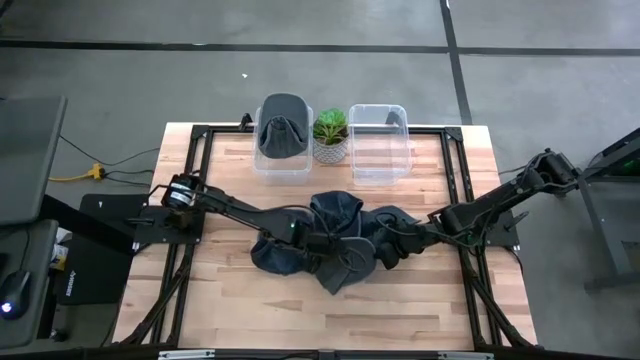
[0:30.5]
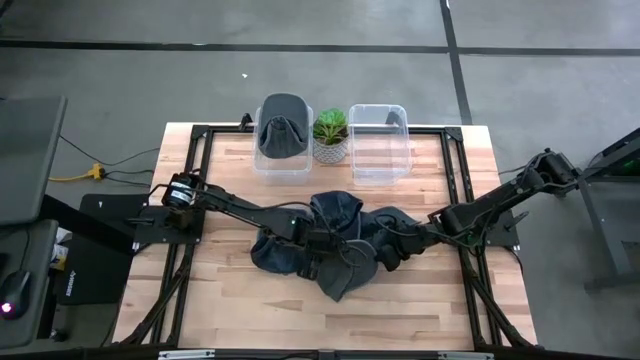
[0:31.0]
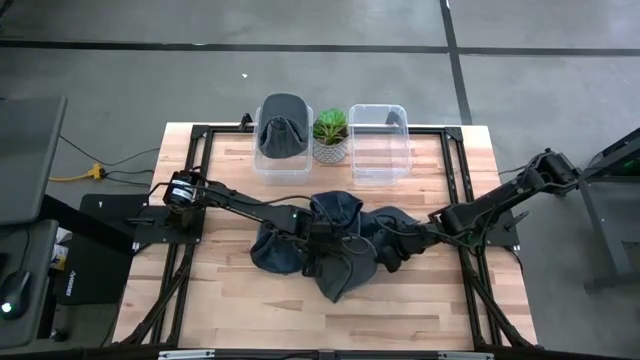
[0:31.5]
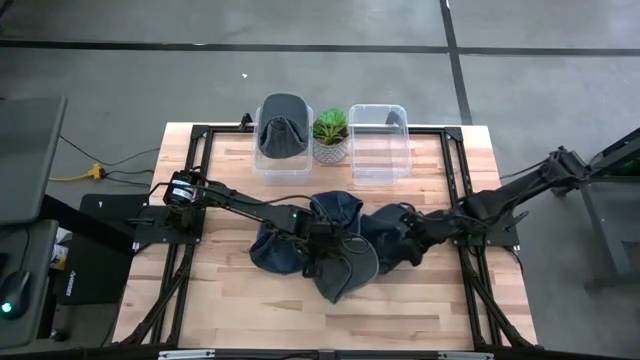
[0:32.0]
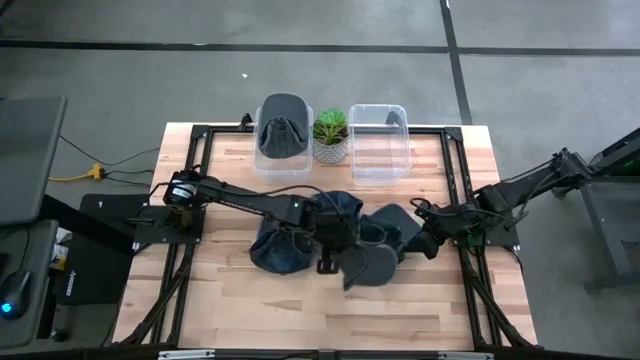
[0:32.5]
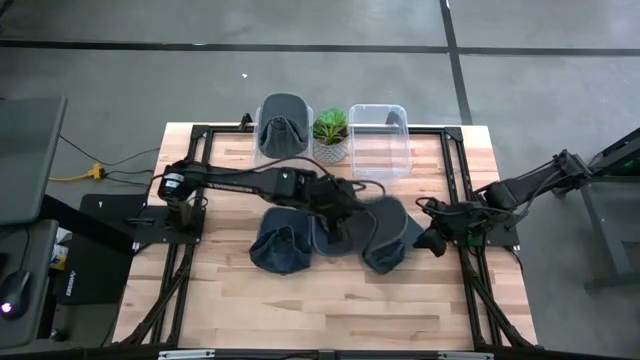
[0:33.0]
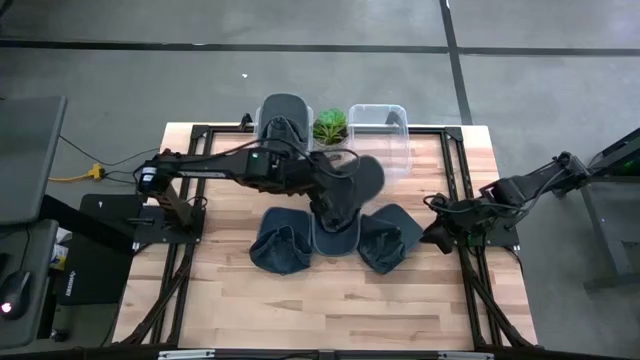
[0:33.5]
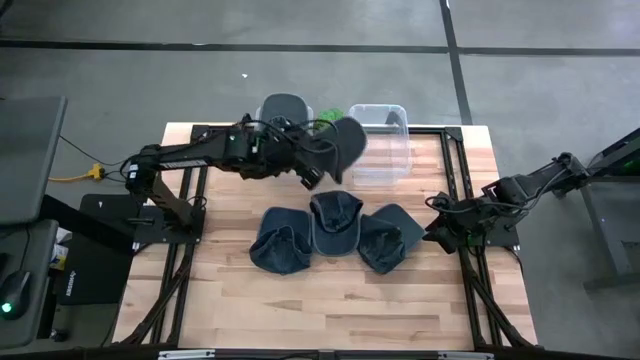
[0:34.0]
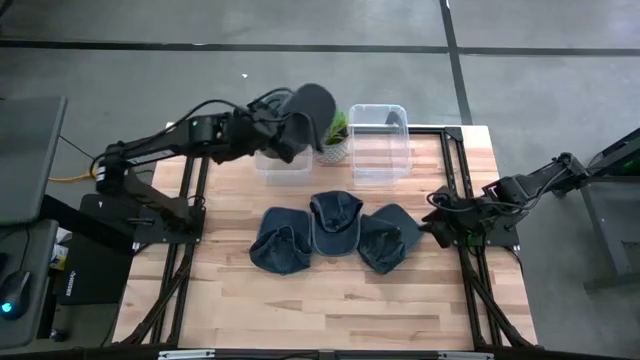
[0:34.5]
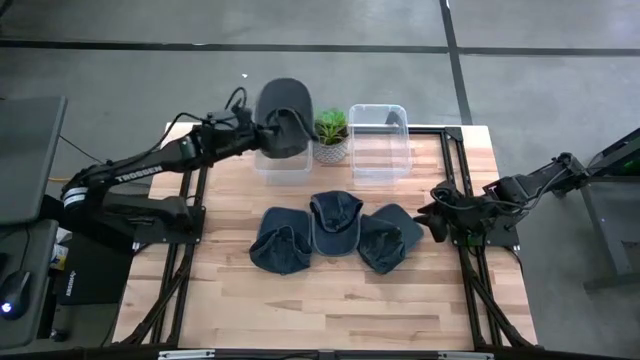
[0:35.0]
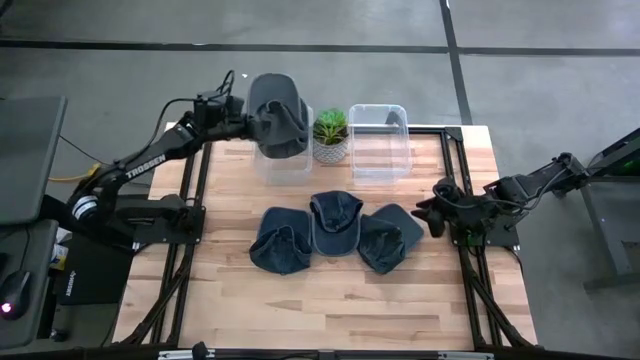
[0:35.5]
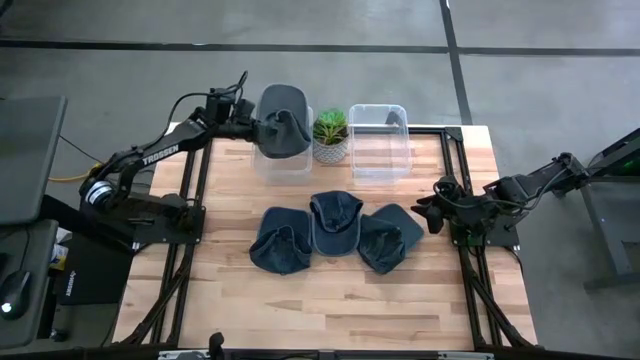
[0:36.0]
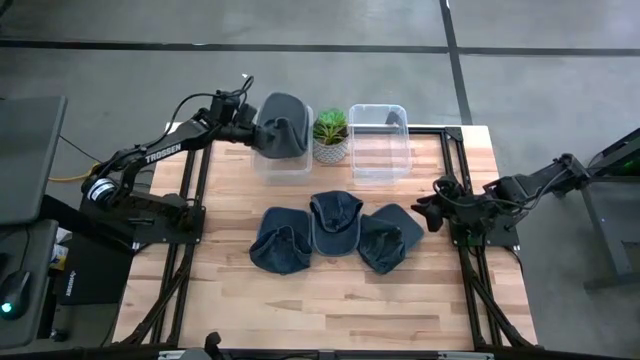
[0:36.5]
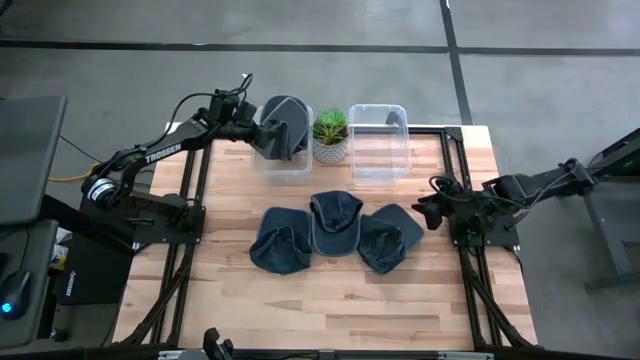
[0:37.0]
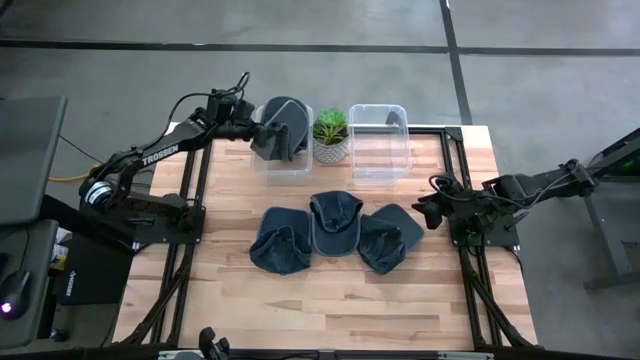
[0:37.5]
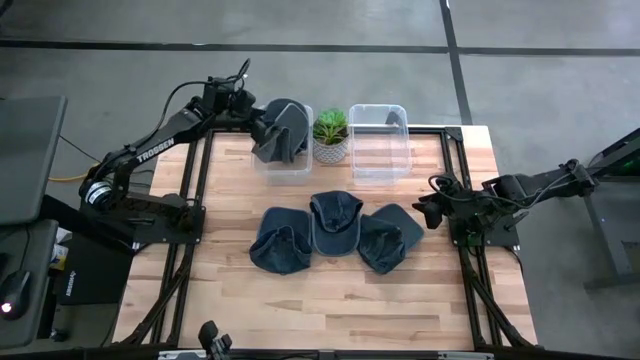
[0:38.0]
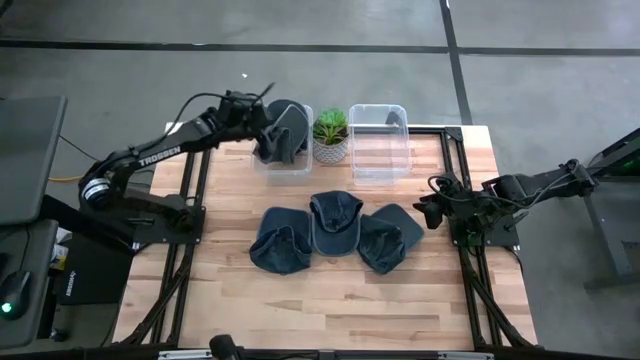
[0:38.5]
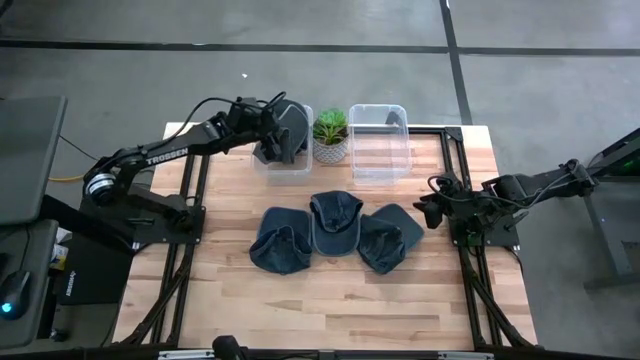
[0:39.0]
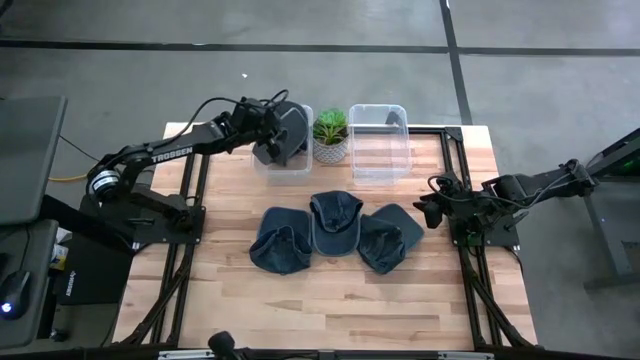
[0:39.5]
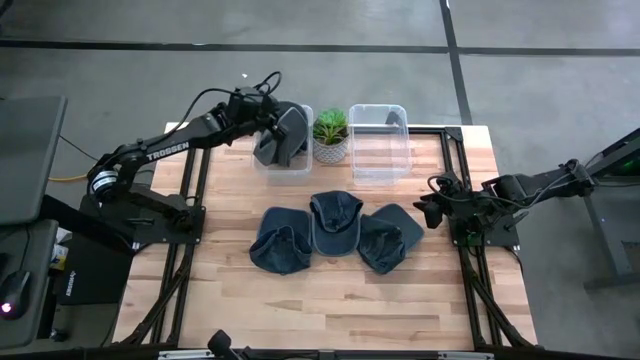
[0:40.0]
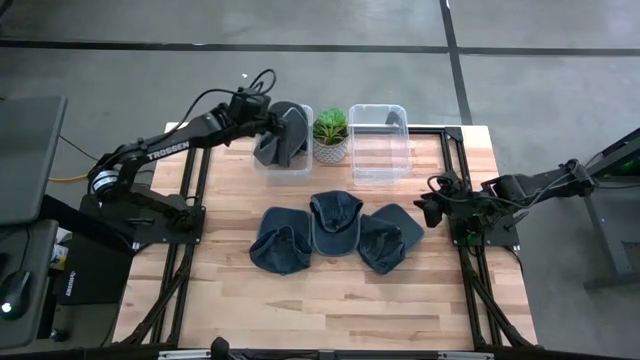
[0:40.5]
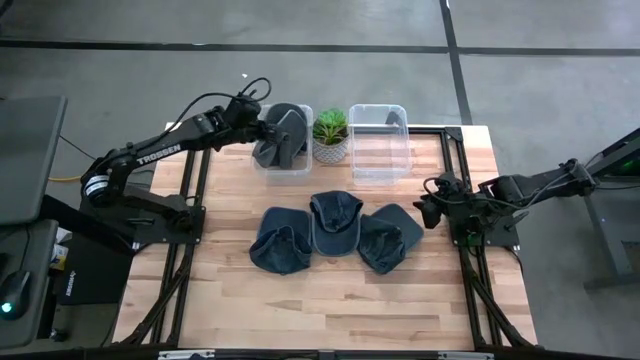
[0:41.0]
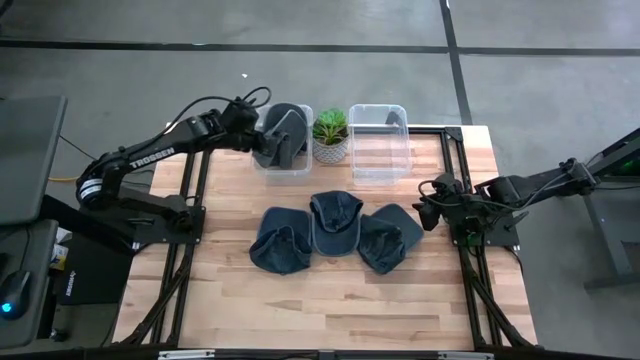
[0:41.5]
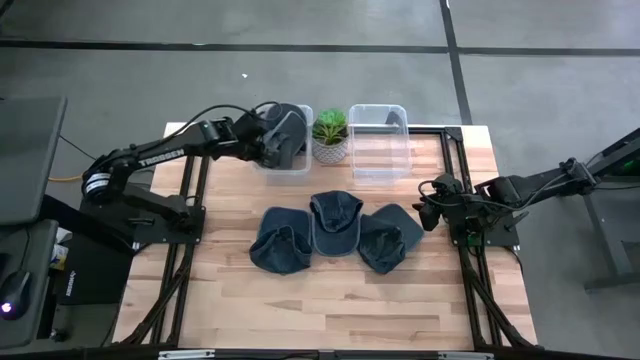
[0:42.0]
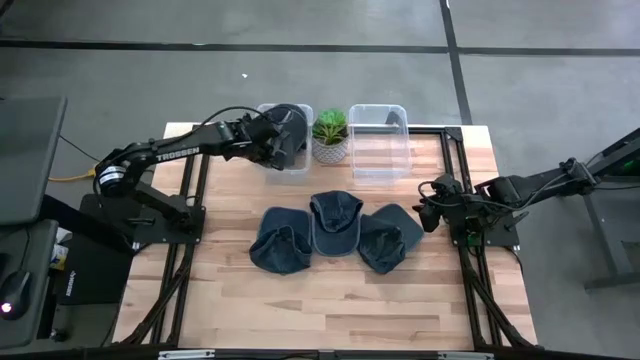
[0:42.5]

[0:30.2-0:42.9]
Task: Pick & Place hat
Put the gray cap into the left transparent bin

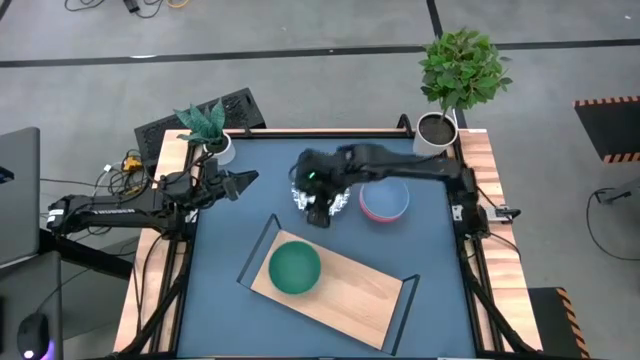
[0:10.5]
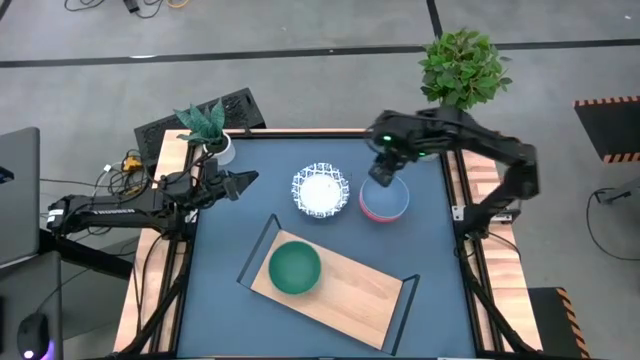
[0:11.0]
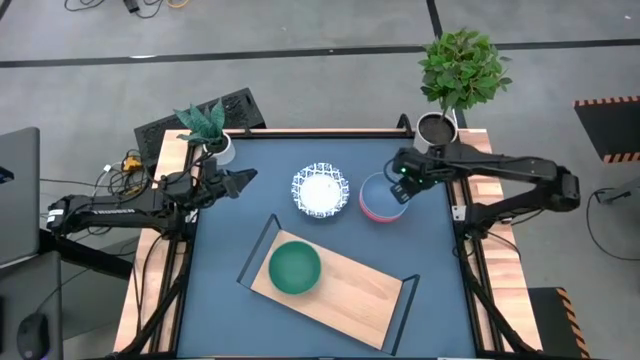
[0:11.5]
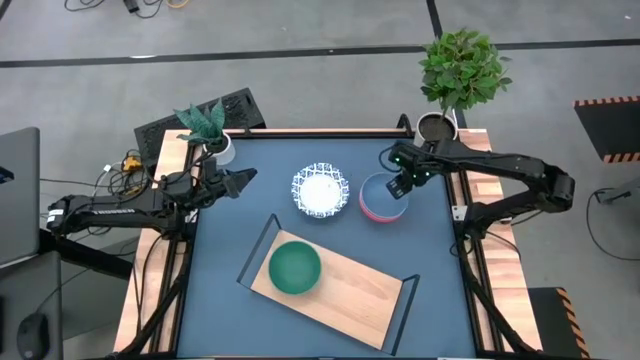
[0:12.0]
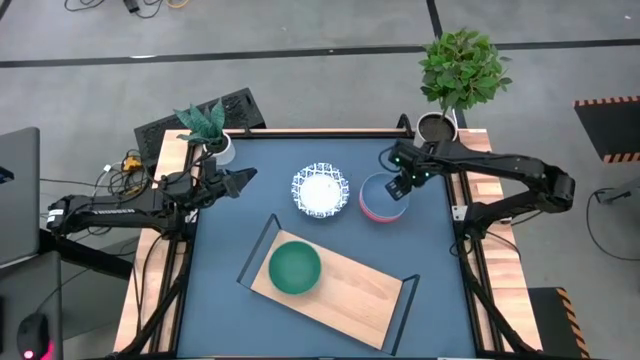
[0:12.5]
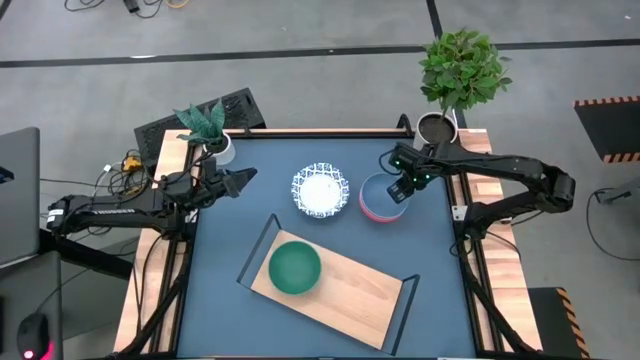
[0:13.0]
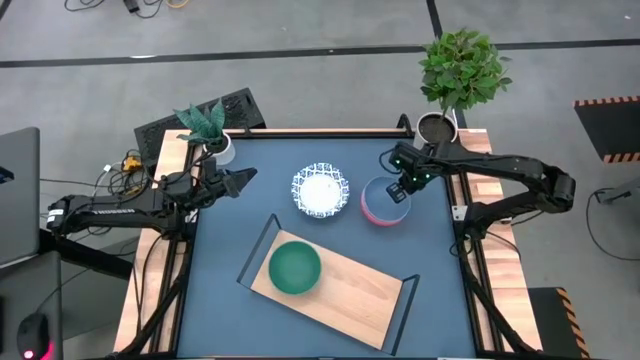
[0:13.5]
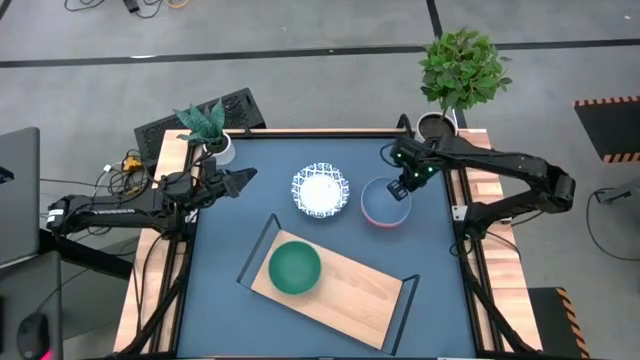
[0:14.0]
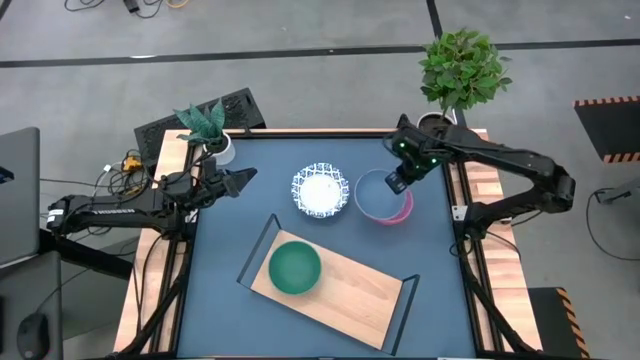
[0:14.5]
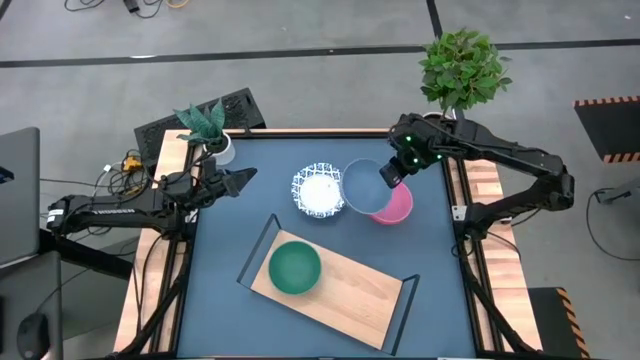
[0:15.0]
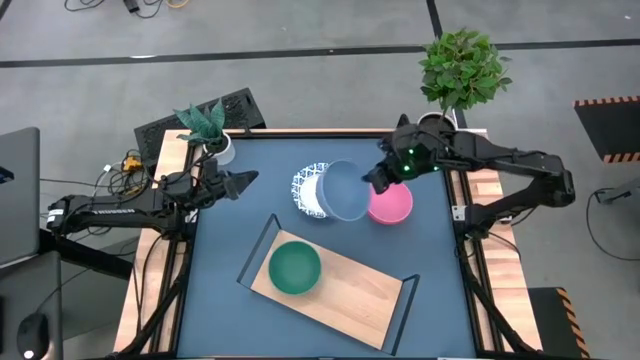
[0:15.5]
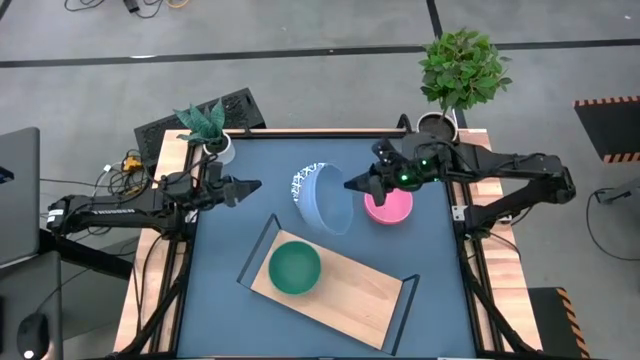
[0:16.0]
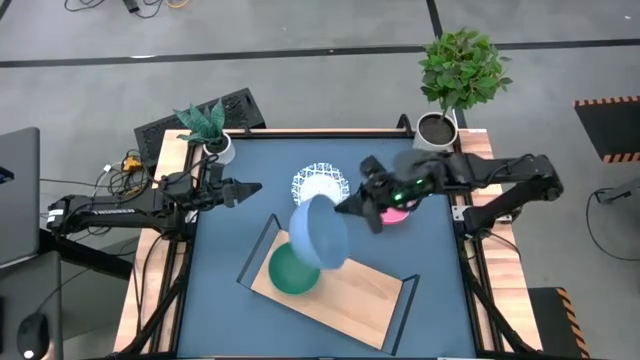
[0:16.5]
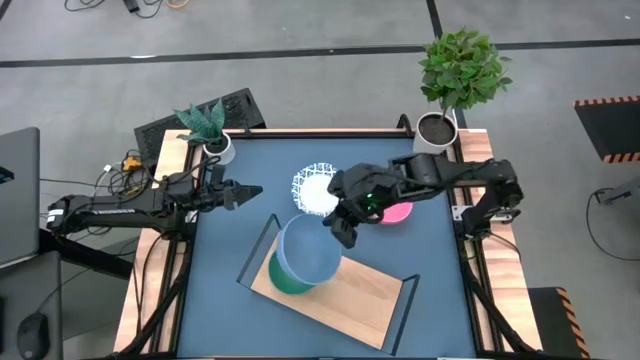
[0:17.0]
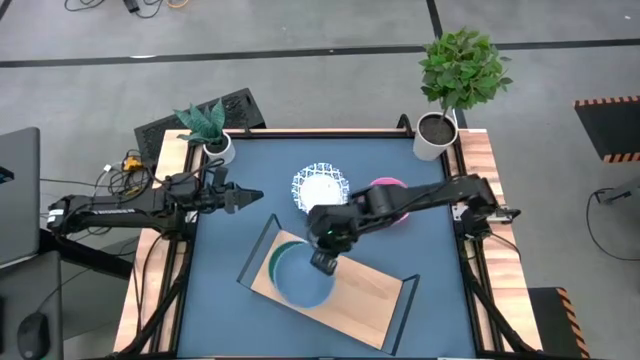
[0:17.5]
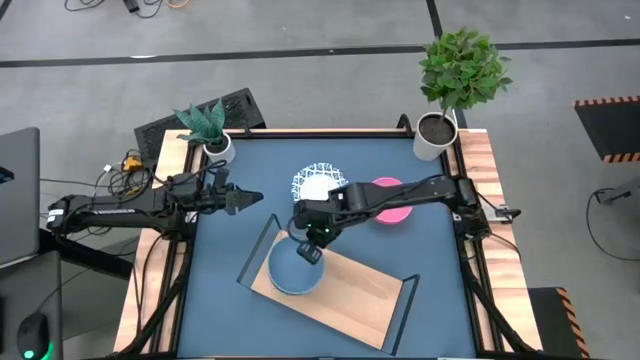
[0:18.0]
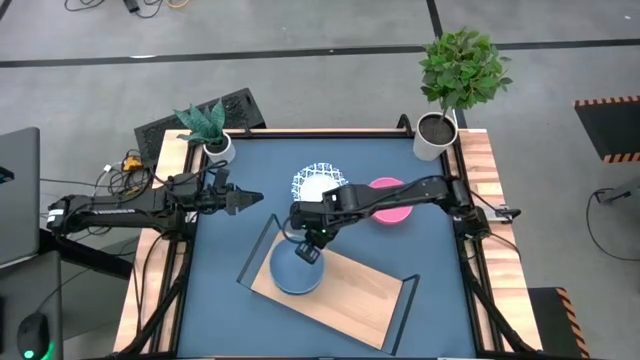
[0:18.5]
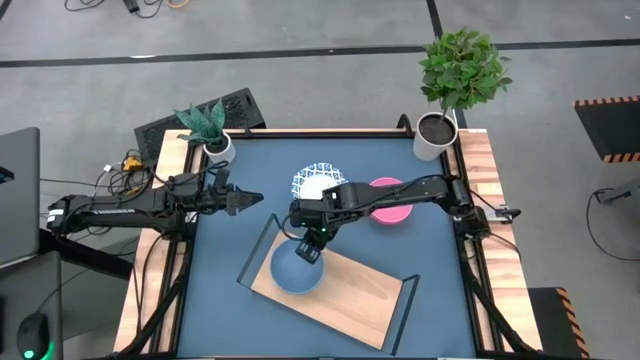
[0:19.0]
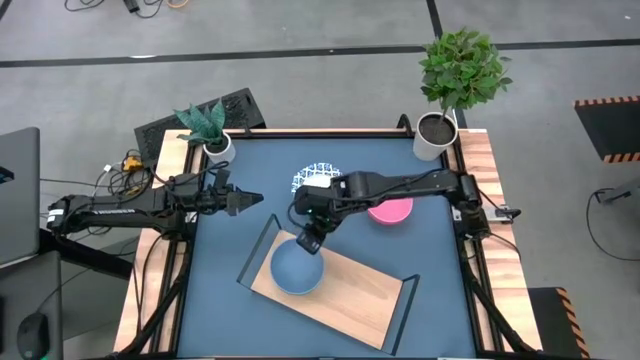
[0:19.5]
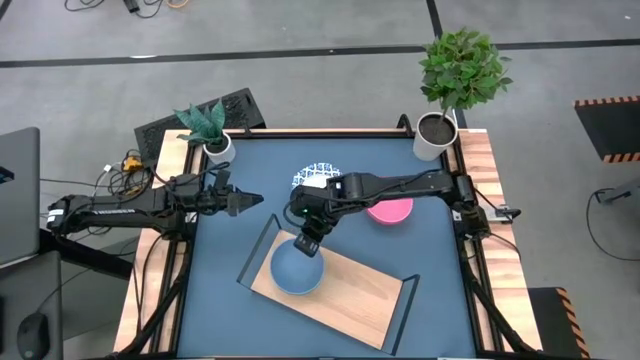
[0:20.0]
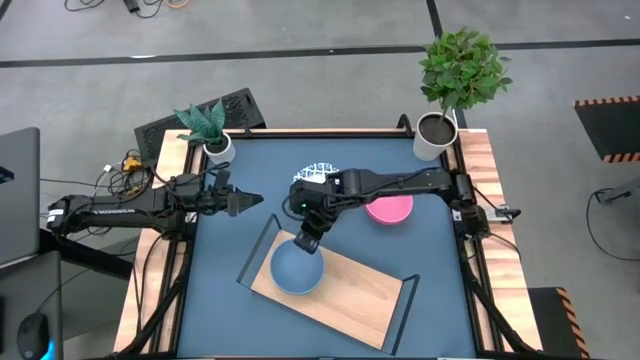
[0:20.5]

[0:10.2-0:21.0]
Task: Place and stack bowls onto a shelf
Stack the blue bowl on top of the green bowl on the shelf
